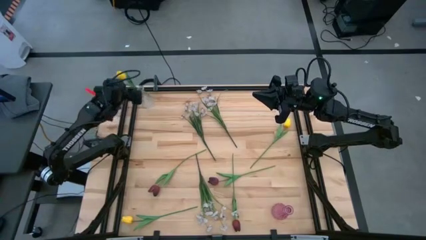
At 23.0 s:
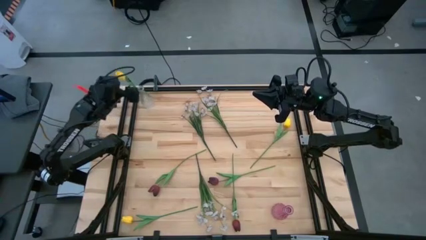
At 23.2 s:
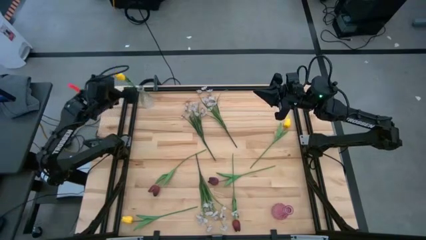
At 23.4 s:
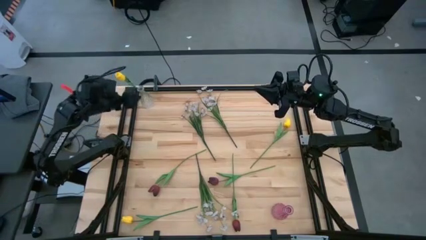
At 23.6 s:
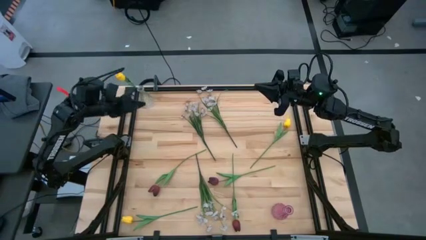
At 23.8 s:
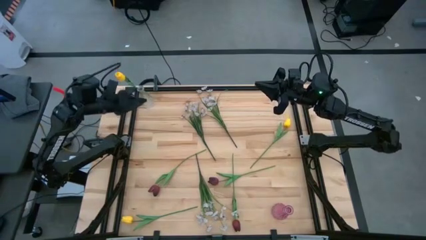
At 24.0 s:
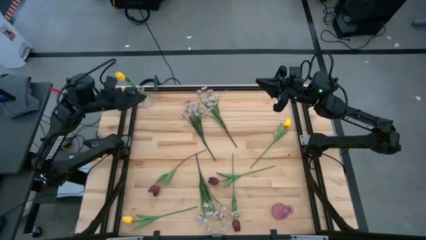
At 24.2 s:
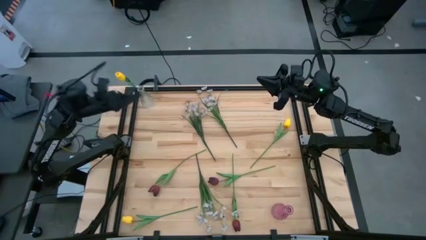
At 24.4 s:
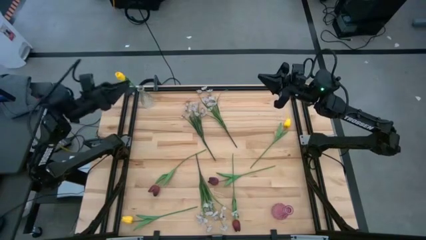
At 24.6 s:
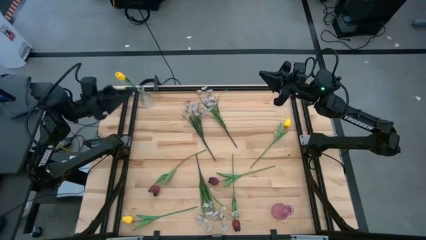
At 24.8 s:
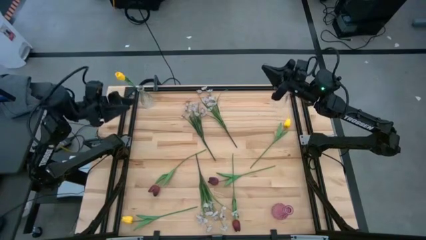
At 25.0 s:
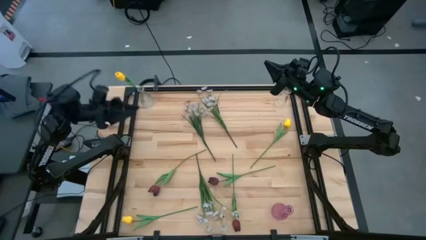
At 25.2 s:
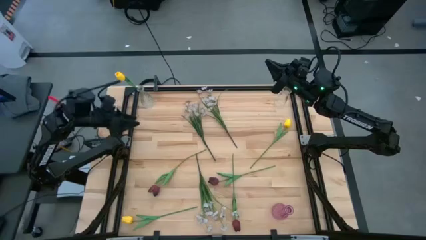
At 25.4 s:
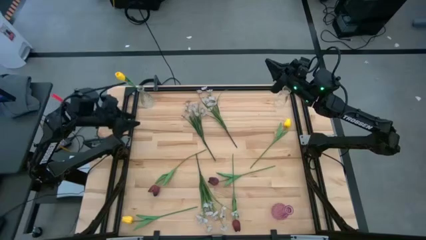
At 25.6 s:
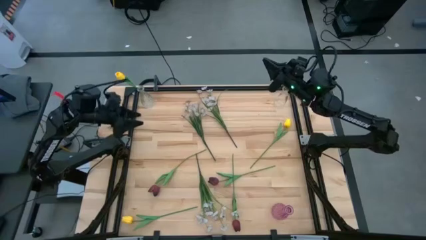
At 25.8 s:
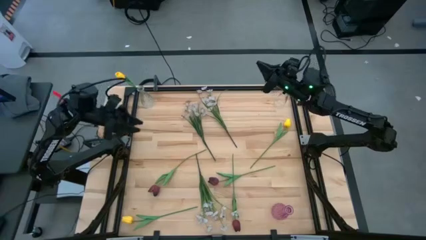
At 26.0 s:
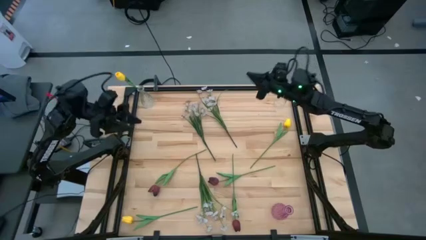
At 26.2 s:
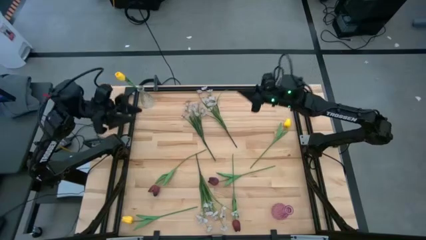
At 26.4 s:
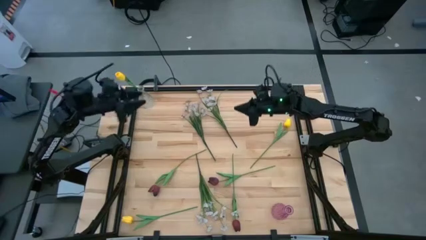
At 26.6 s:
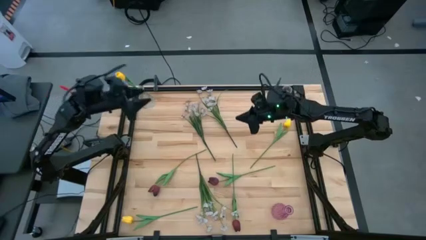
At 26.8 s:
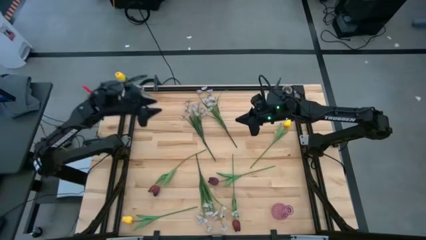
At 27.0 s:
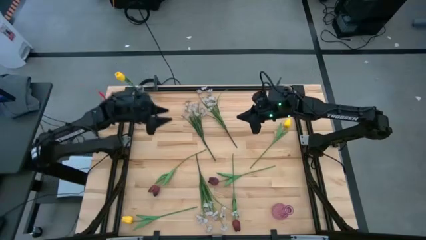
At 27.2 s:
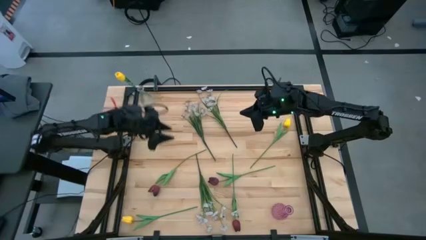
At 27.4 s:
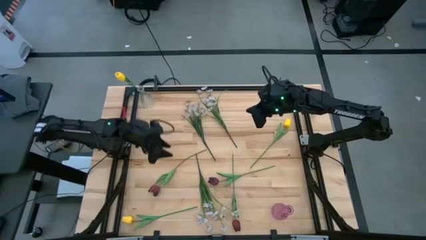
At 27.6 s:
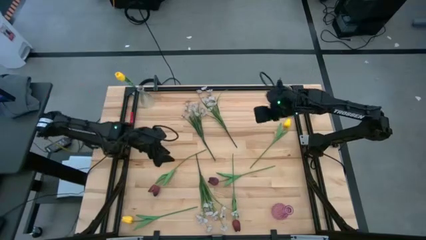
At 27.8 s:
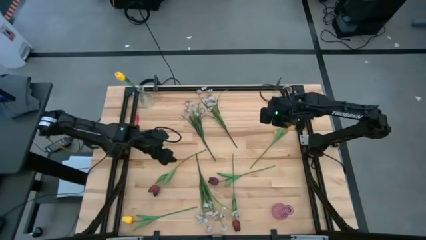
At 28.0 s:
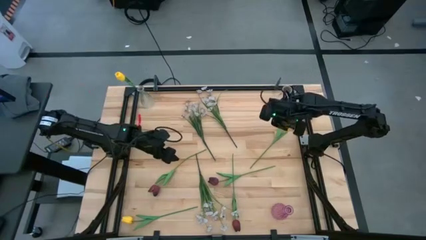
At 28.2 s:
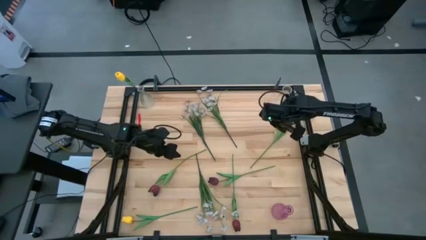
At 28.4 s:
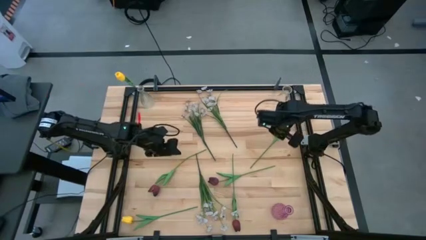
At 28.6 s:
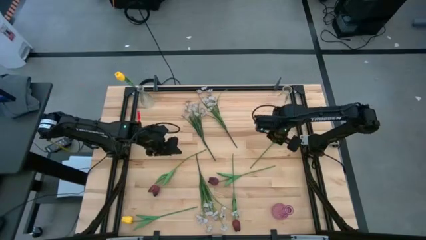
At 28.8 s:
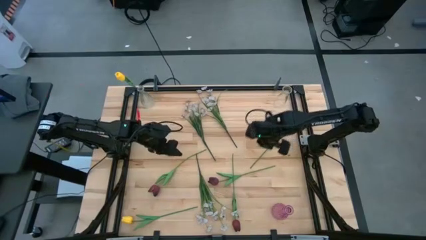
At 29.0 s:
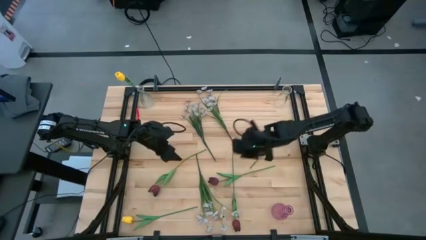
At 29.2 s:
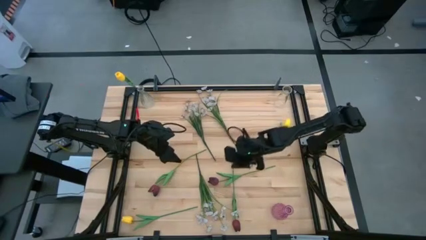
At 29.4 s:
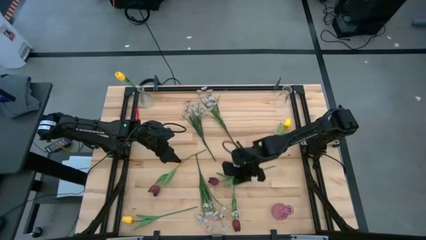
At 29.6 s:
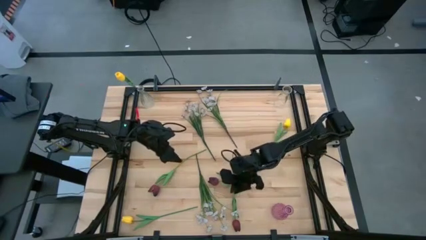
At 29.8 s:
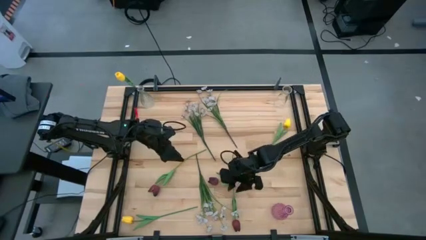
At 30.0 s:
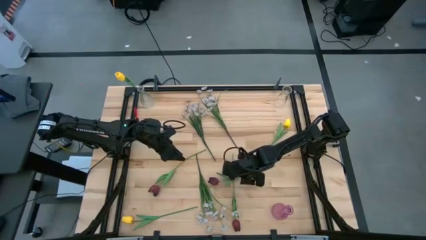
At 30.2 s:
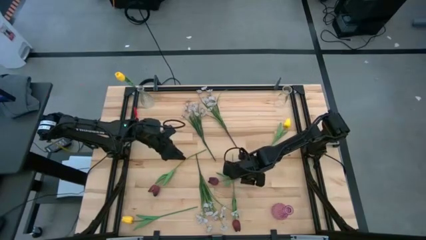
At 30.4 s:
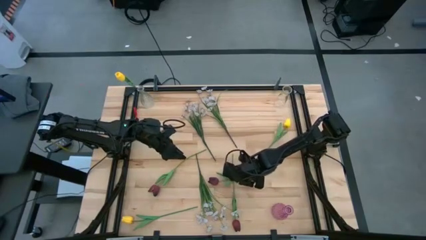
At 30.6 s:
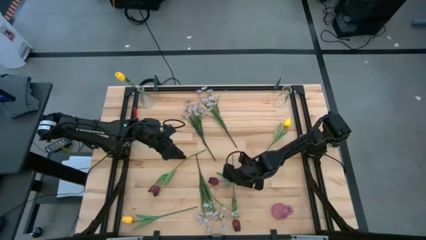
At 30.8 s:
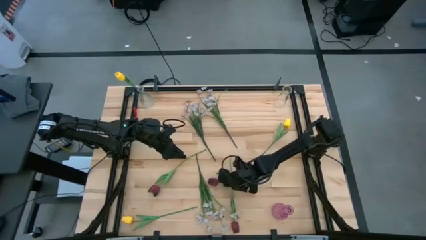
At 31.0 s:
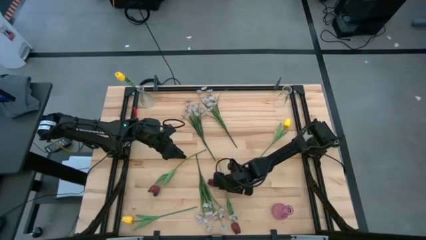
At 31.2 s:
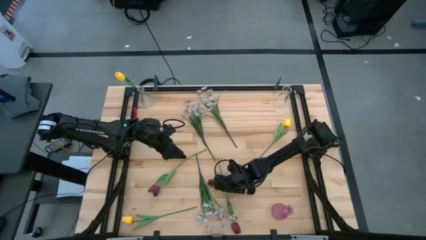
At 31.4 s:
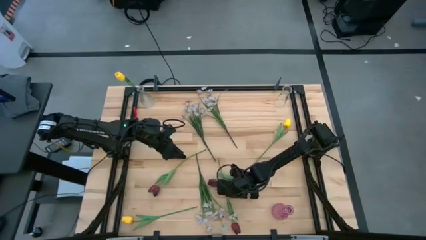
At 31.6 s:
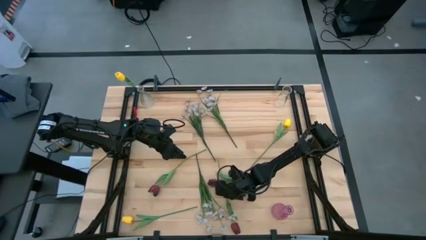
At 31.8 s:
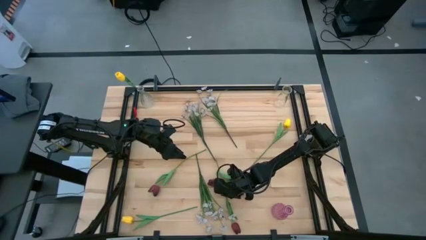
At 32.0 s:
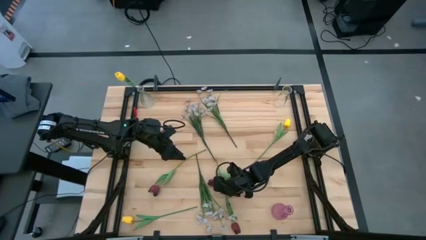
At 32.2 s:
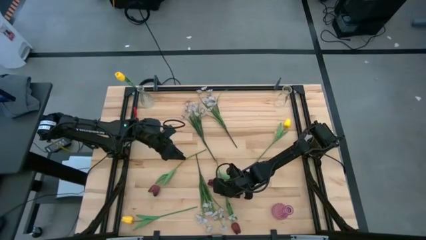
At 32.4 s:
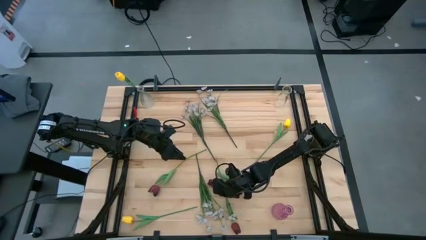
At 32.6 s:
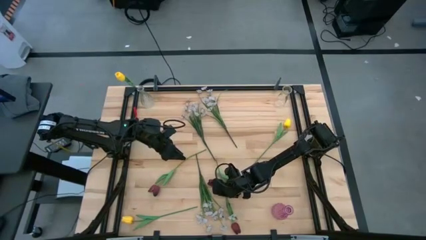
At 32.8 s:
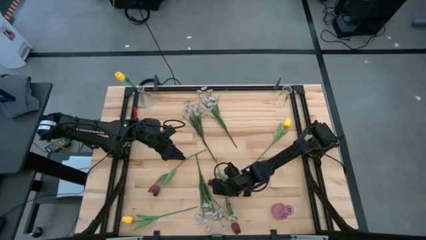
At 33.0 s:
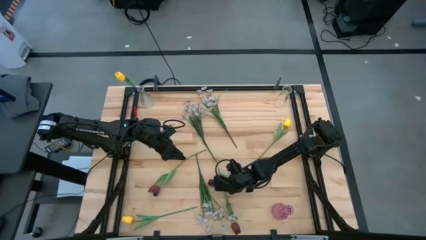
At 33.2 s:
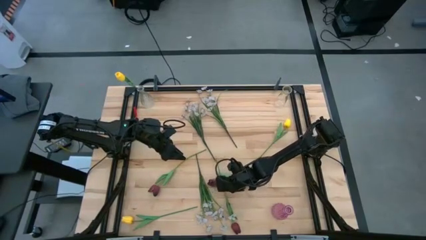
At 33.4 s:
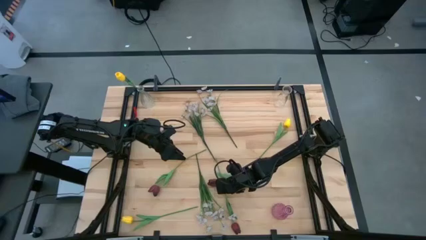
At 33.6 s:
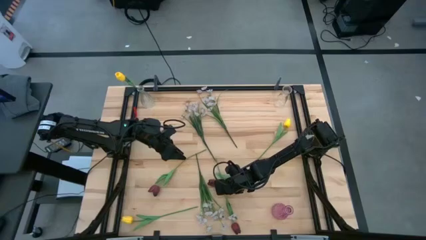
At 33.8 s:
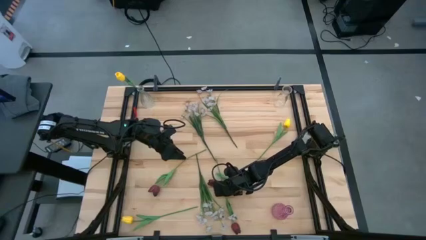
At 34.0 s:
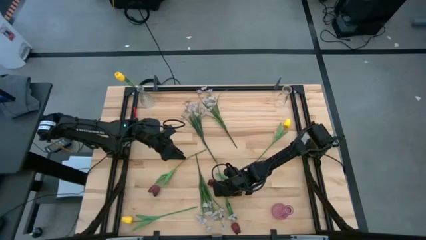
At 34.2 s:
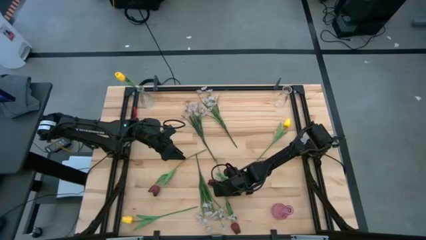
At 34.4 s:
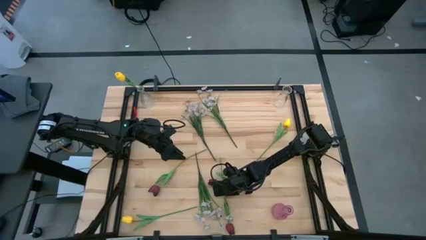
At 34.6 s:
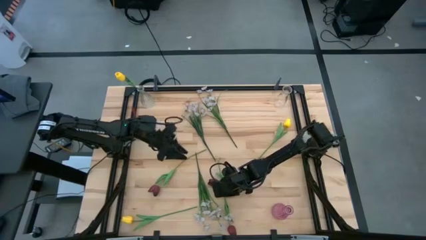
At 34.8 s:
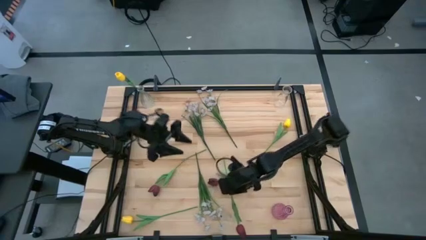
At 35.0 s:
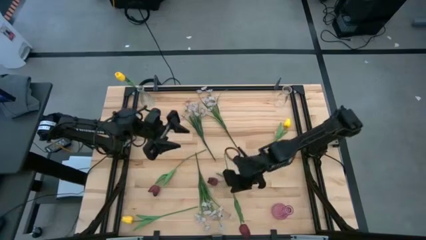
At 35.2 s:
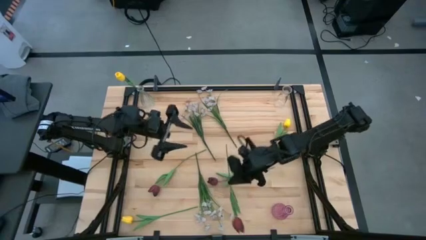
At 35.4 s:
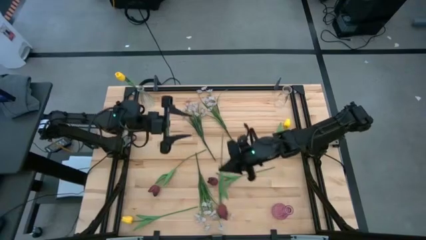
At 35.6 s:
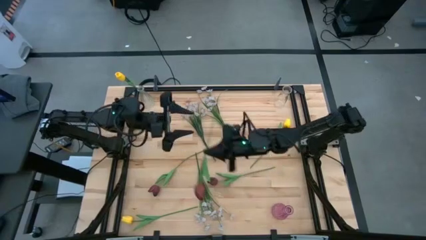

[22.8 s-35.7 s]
Task: Sort flowers into vase by color
Put the bottom red flower into the right transparent vase
